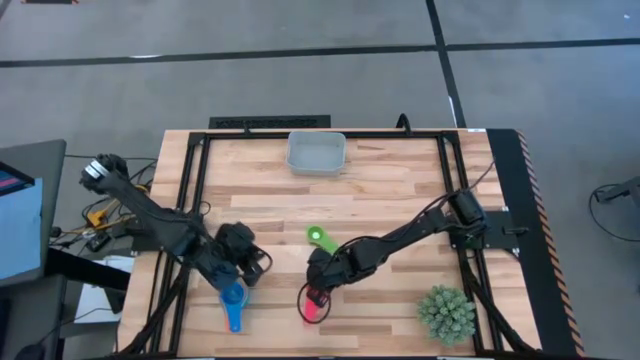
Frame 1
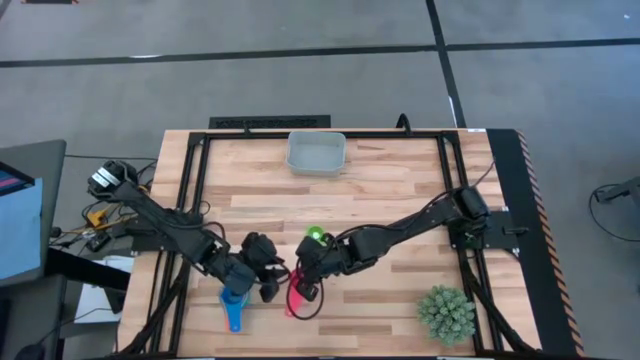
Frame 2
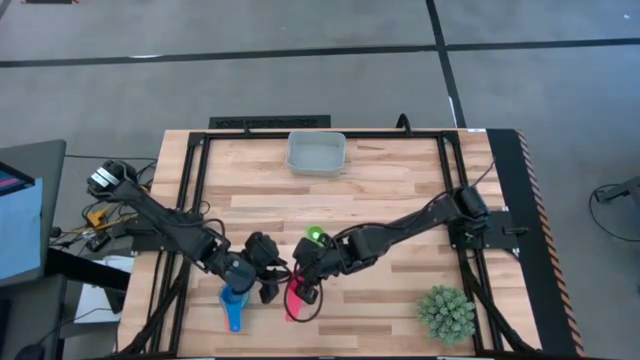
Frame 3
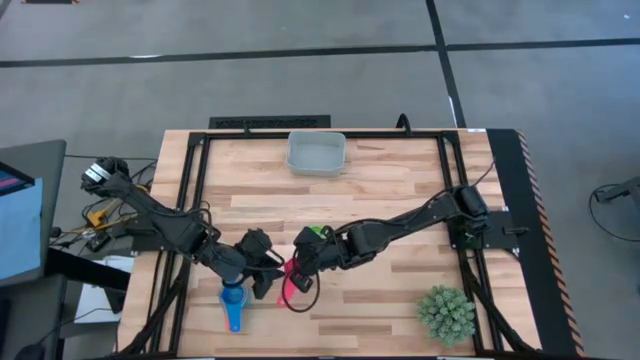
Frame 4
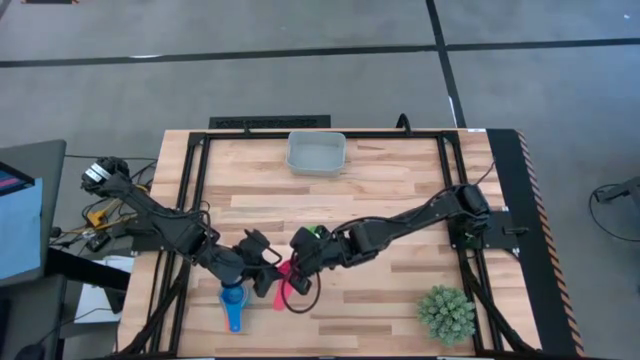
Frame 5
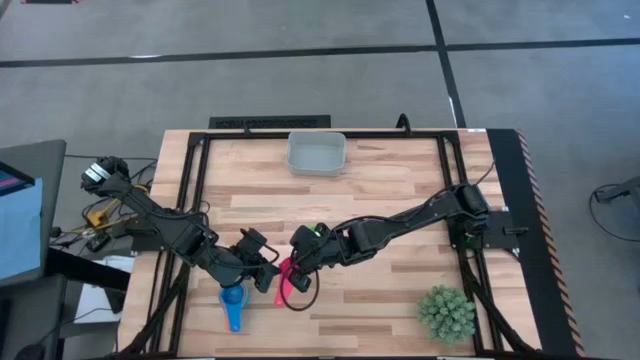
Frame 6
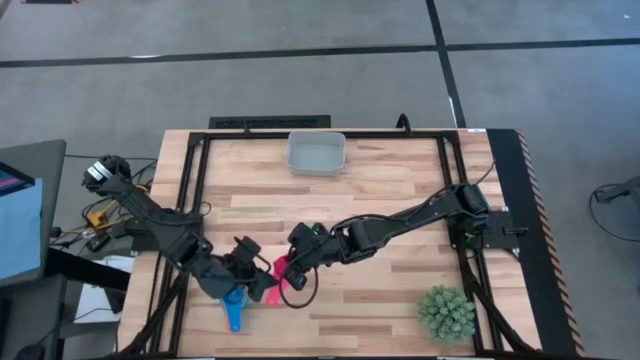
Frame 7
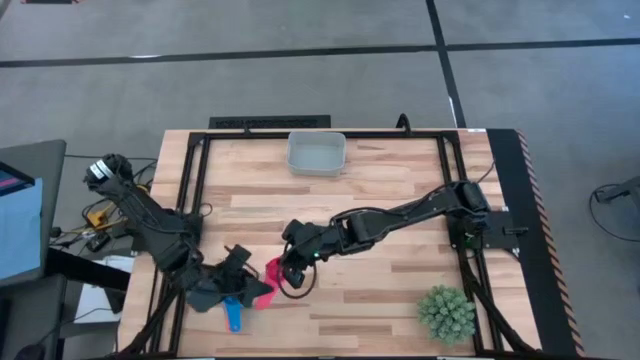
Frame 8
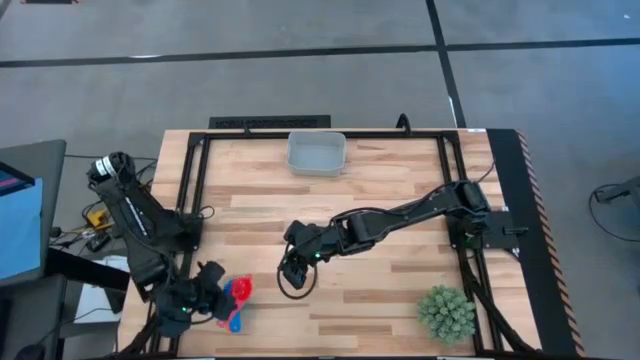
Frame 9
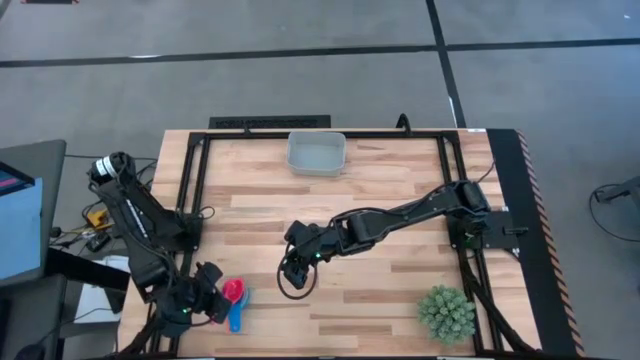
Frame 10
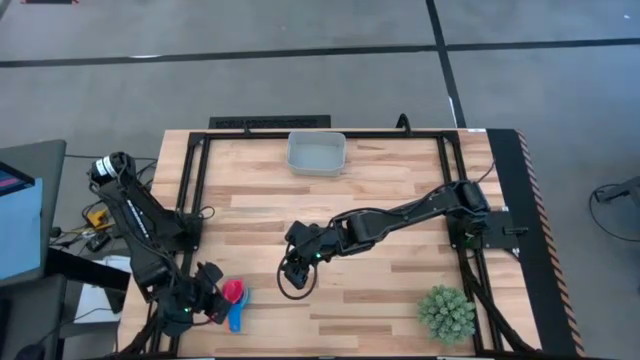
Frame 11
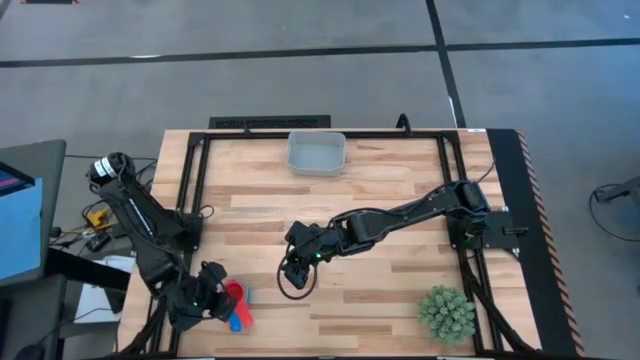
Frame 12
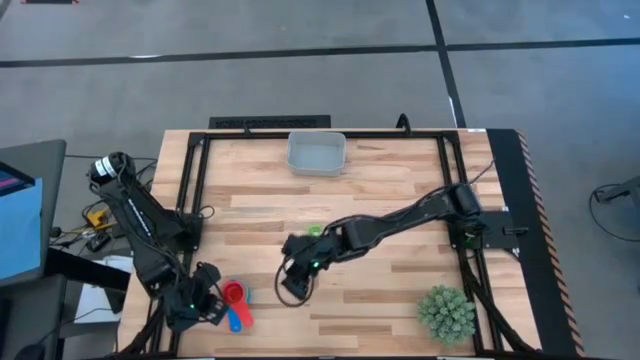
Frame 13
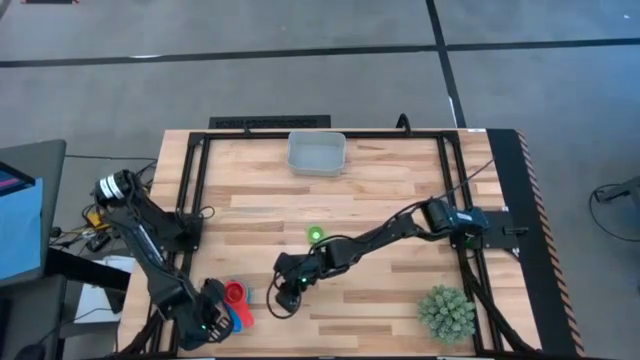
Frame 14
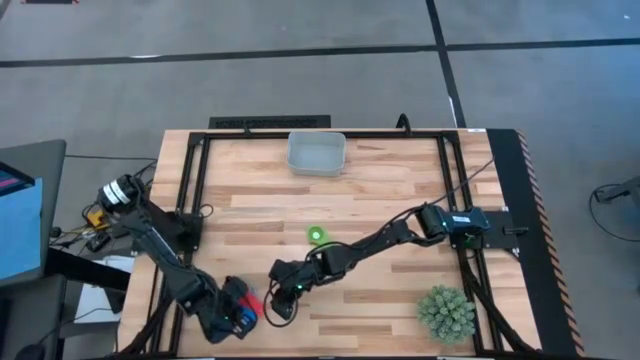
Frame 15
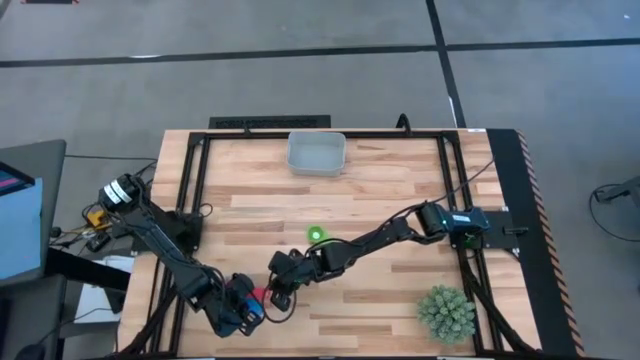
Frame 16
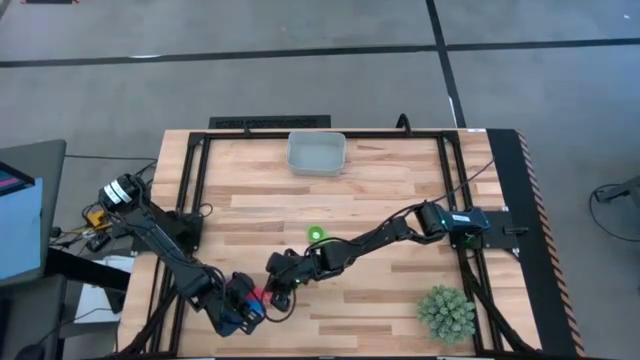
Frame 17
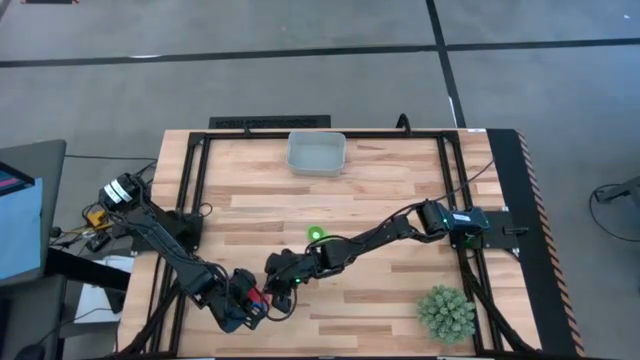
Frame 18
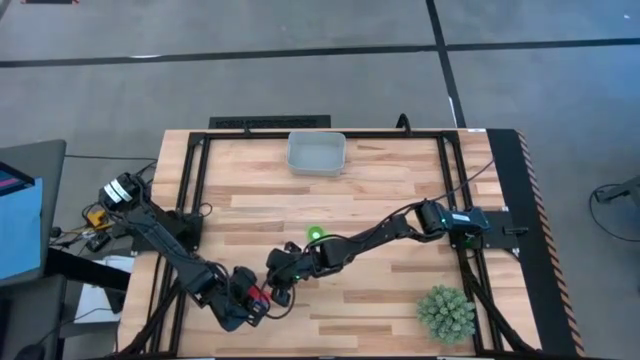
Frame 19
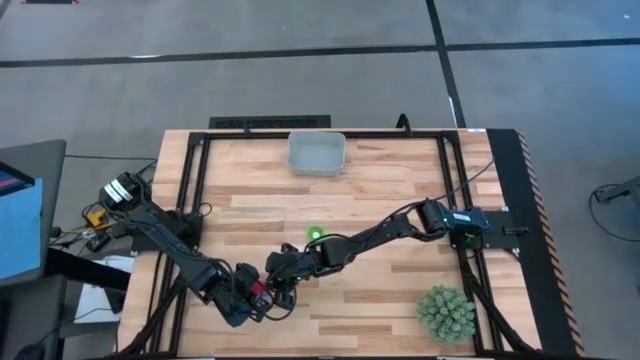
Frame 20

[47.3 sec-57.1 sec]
Task: Nest measuring cups in basket
Stack the red measuring cup on top of the blue measuring cup

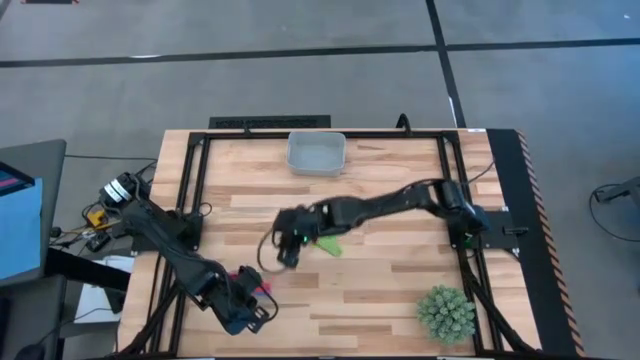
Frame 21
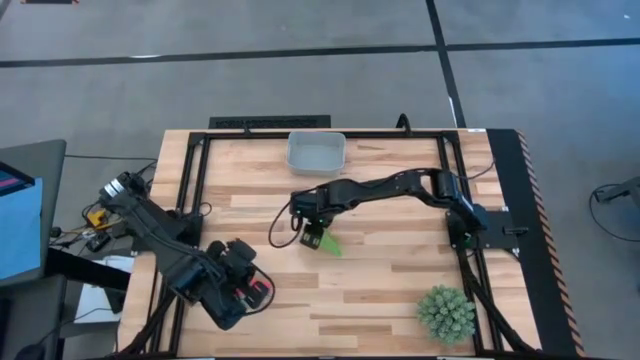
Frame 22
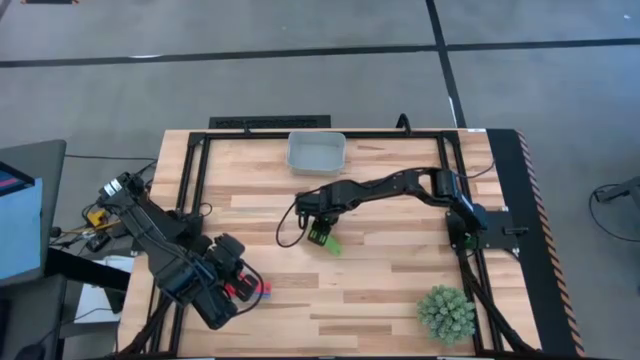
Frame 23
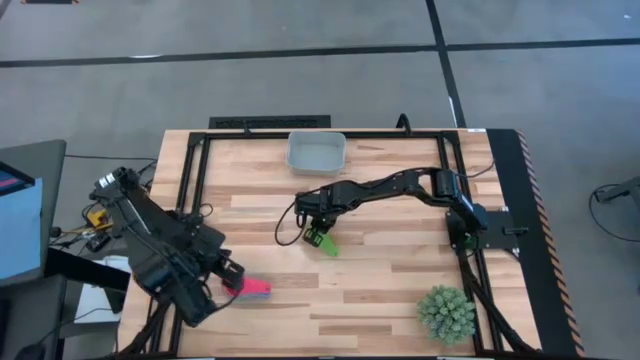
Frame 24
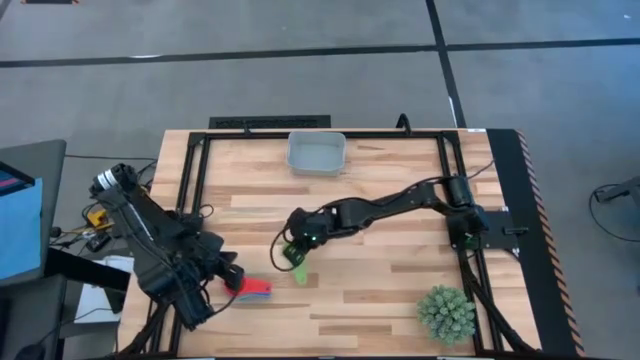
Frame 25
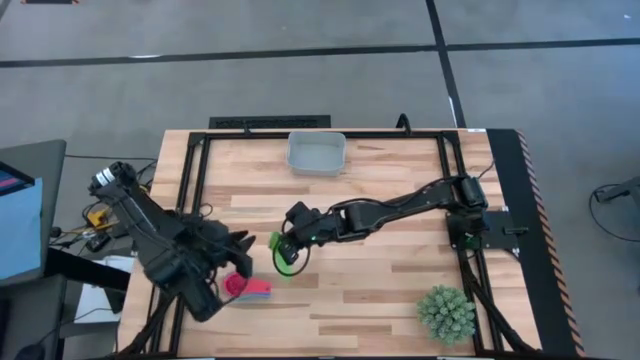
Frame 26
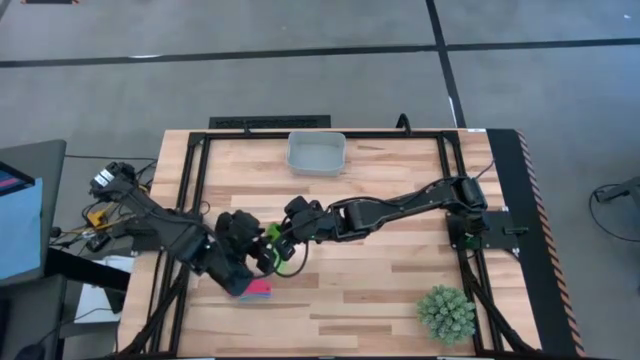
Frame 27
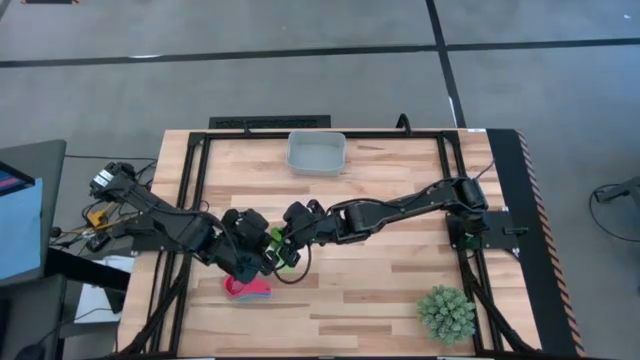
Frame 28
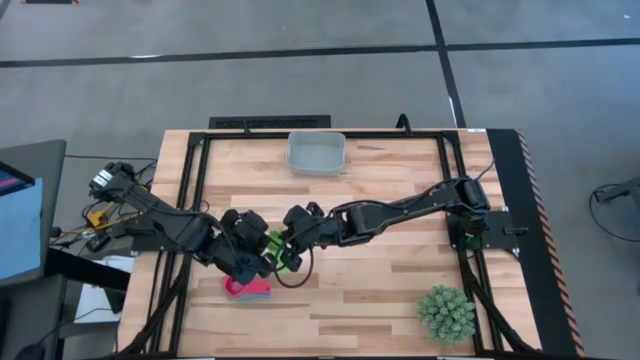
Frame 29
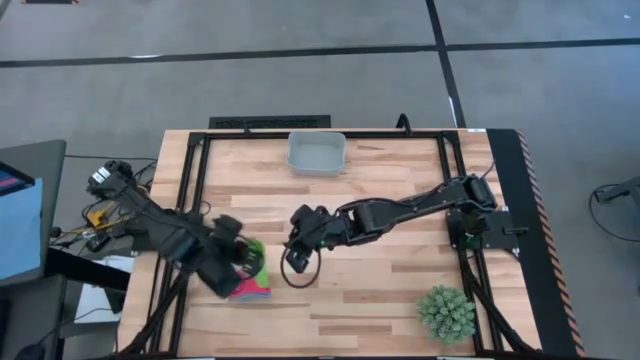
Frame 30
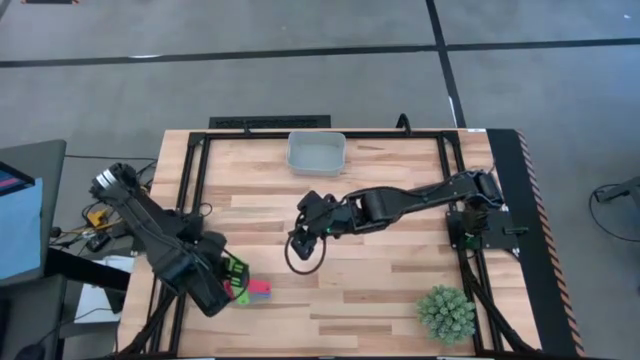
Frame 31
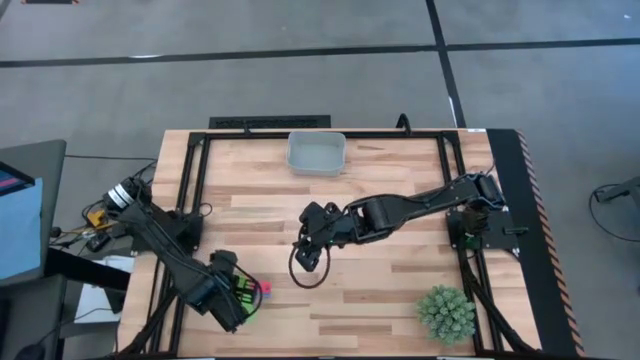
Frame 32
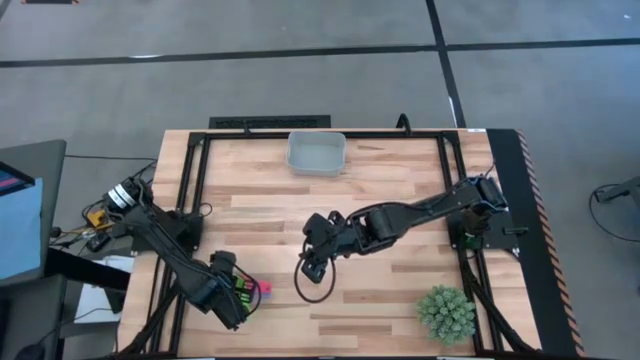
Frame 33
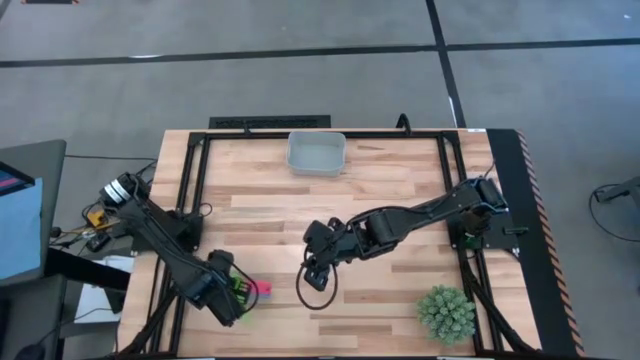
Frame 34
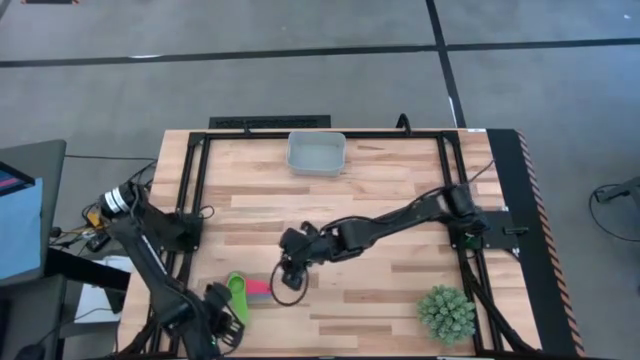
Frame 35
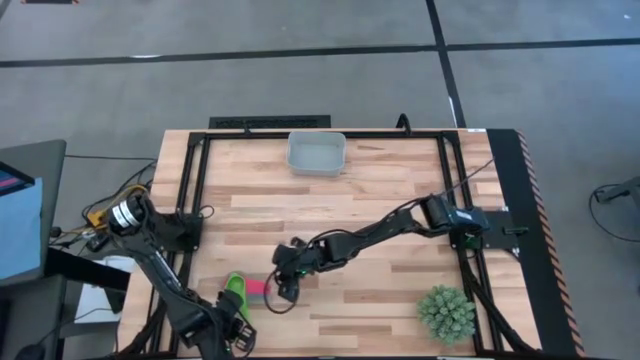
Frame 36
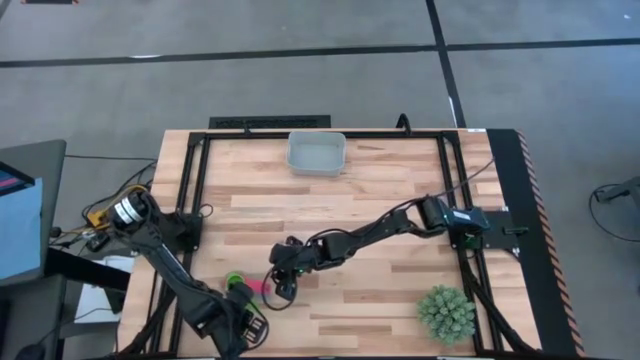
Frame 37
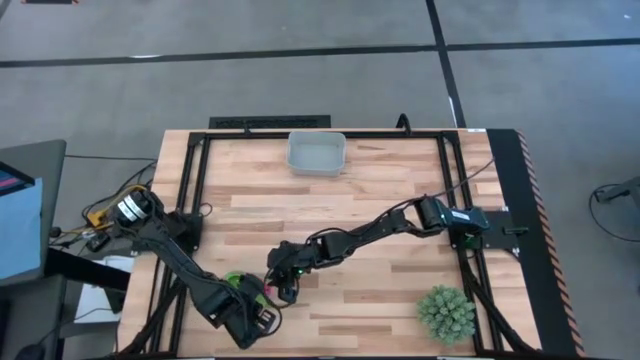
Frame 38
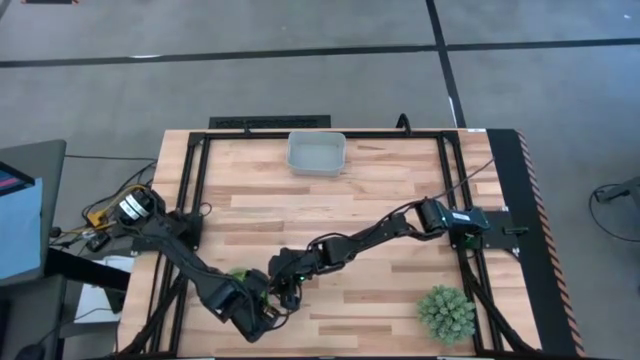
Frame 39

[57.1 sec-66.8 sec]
Stack the green measuring cup on top of the red measuring cup

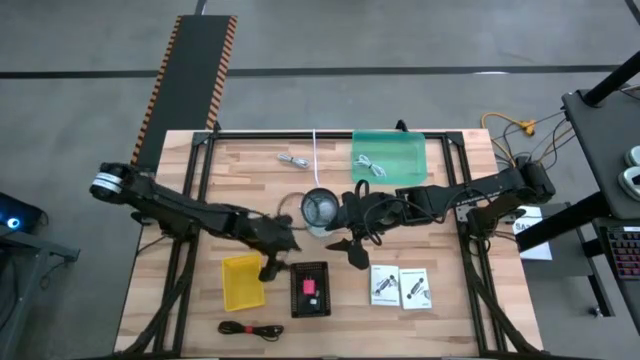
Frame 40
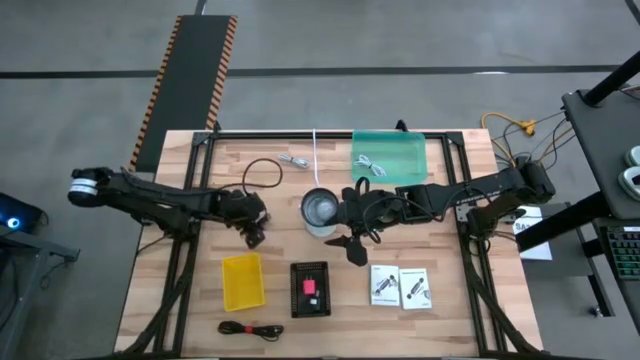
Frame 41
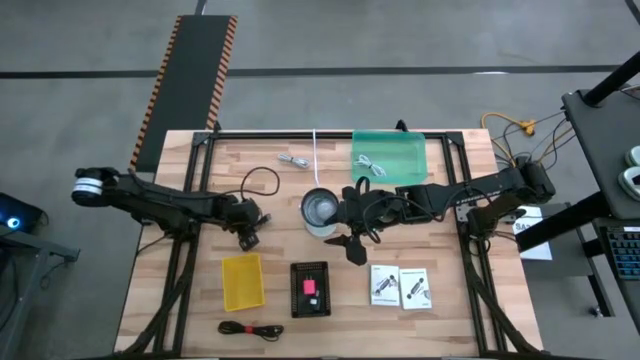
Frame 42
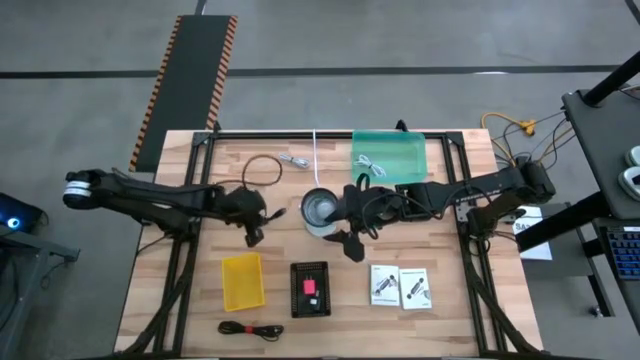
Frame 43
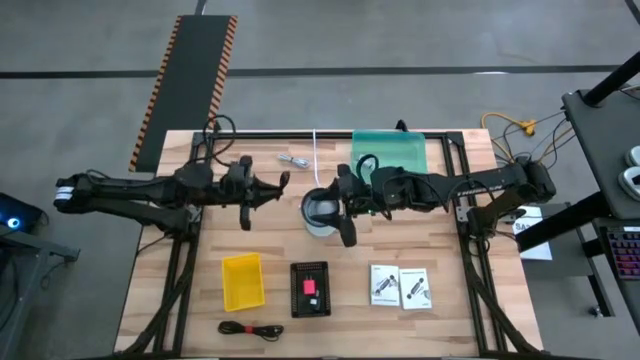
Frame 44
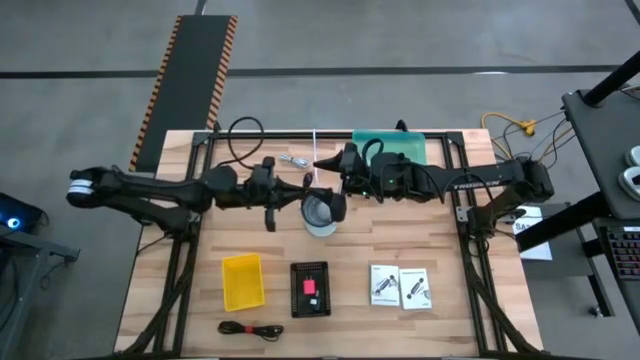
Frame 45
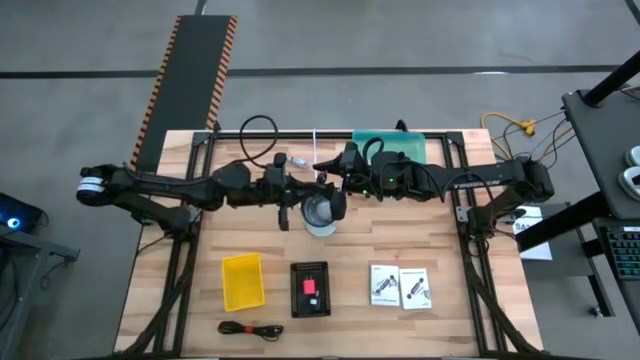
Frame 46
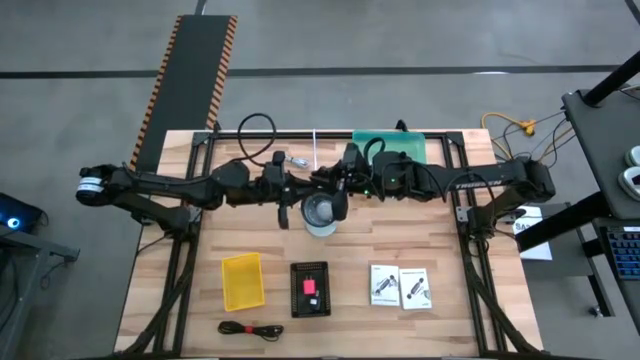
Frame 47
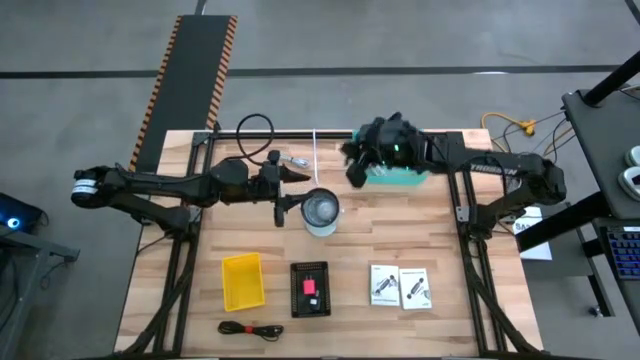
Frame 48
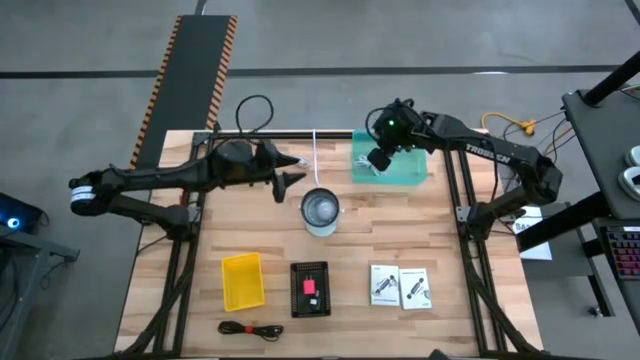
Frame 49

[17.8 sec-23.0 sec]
Task: Pick and place items into bin
Put the top black USB cable into the green bin
